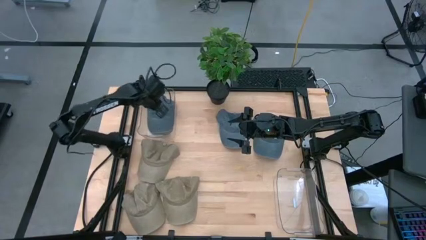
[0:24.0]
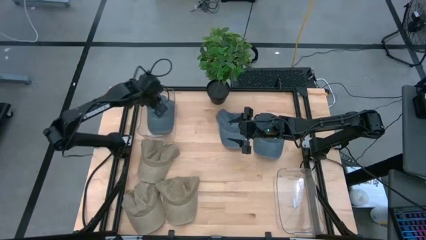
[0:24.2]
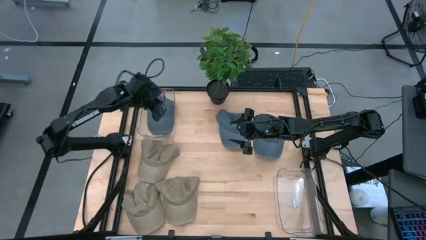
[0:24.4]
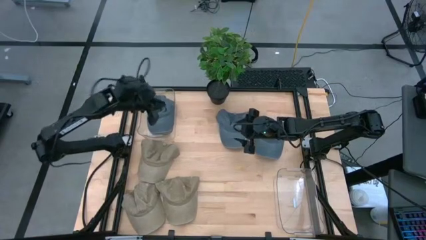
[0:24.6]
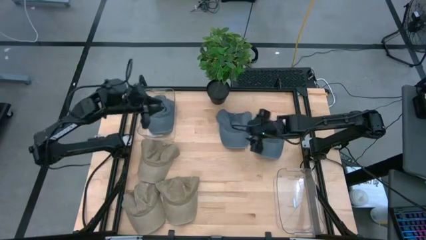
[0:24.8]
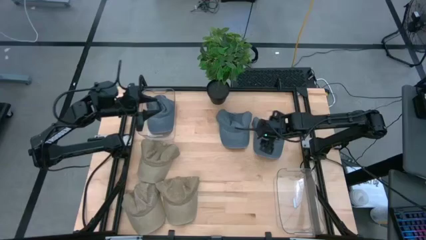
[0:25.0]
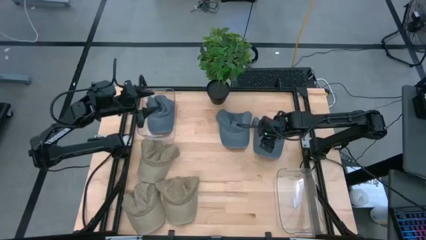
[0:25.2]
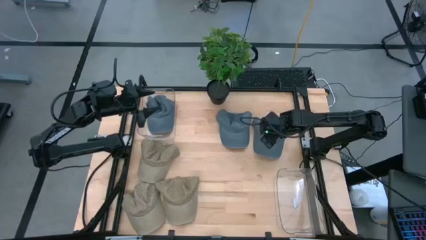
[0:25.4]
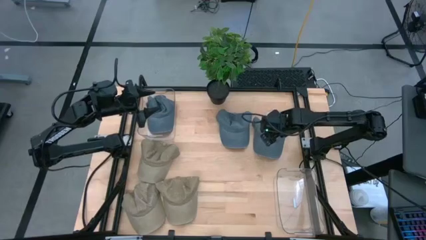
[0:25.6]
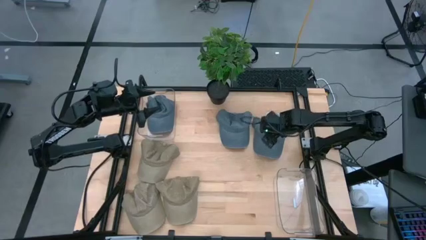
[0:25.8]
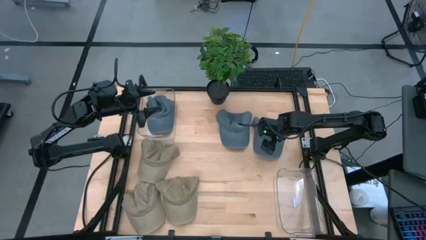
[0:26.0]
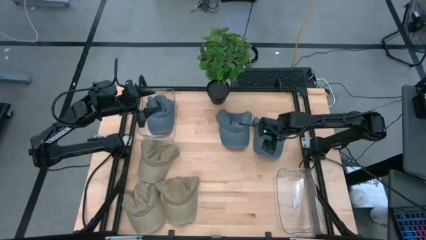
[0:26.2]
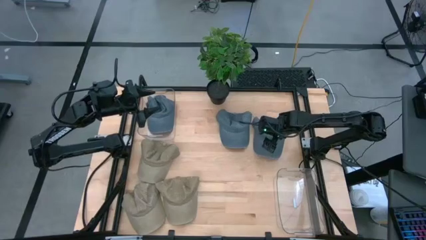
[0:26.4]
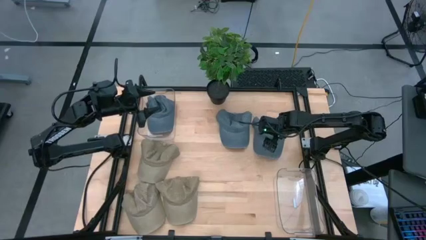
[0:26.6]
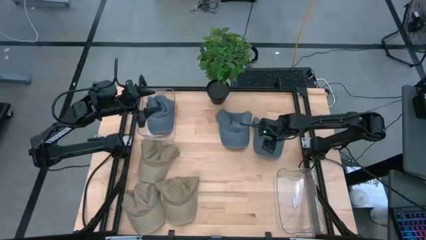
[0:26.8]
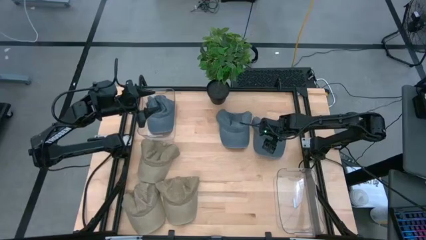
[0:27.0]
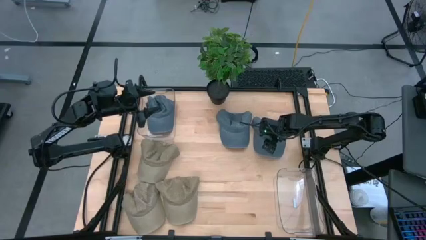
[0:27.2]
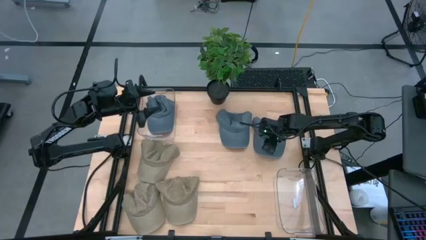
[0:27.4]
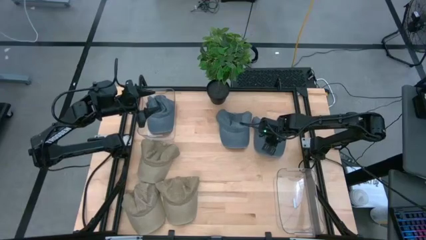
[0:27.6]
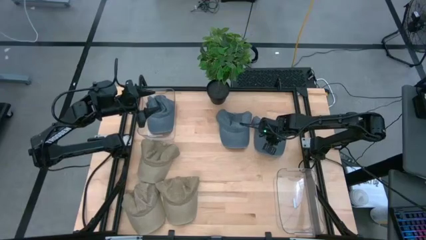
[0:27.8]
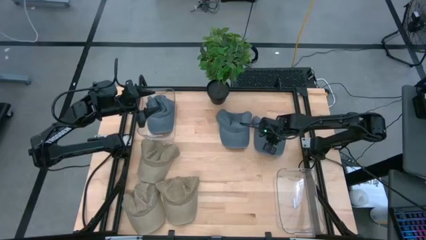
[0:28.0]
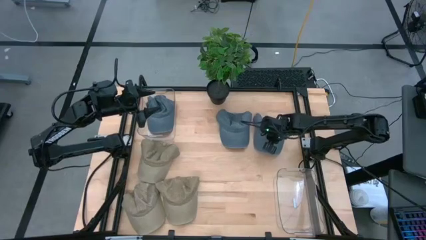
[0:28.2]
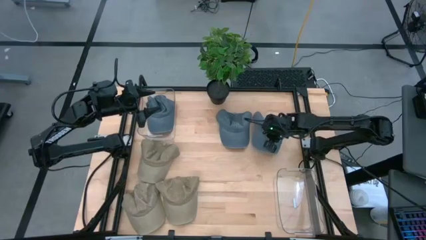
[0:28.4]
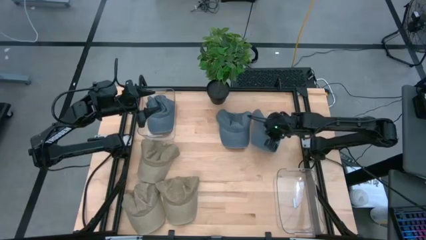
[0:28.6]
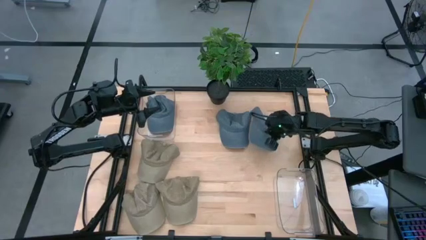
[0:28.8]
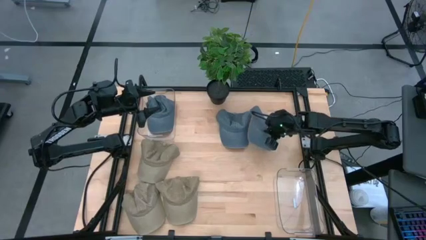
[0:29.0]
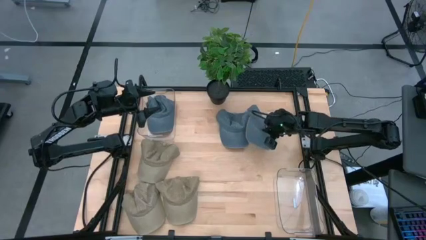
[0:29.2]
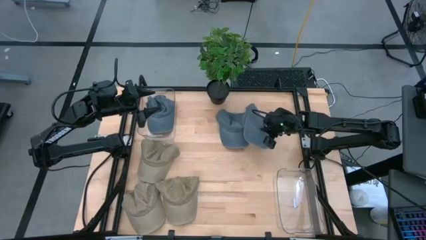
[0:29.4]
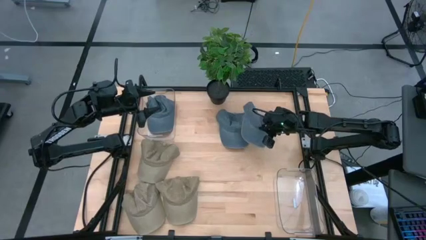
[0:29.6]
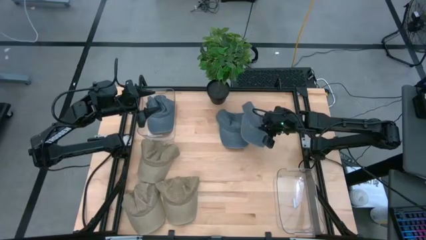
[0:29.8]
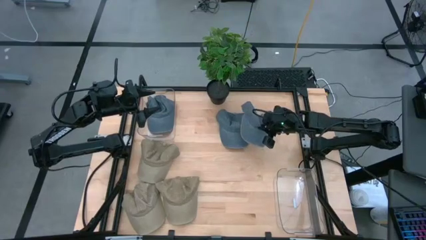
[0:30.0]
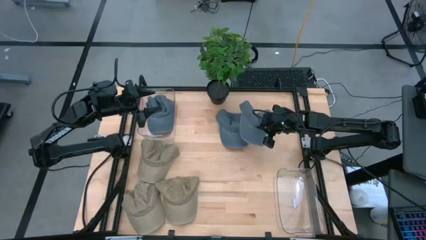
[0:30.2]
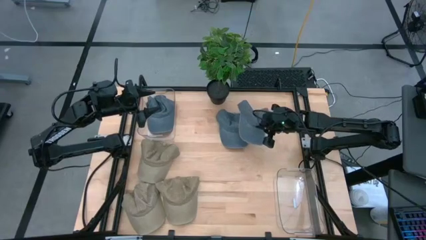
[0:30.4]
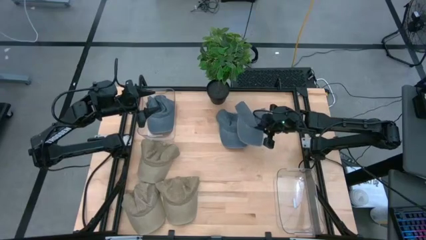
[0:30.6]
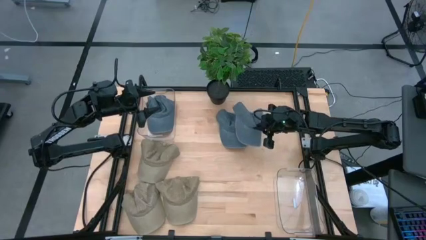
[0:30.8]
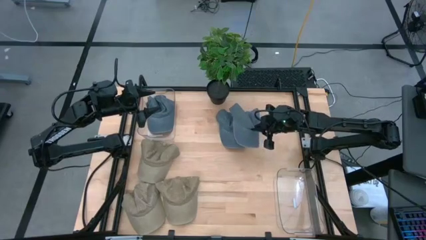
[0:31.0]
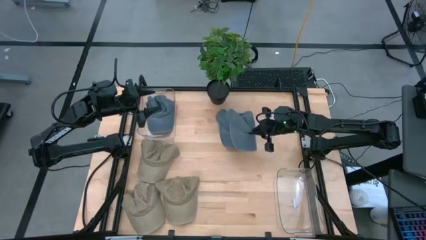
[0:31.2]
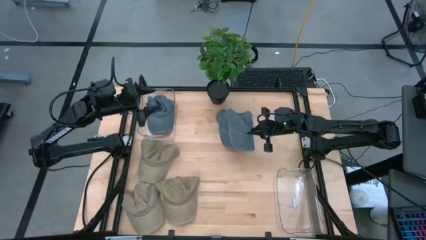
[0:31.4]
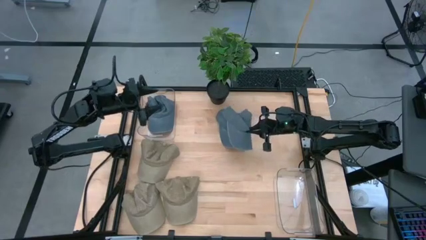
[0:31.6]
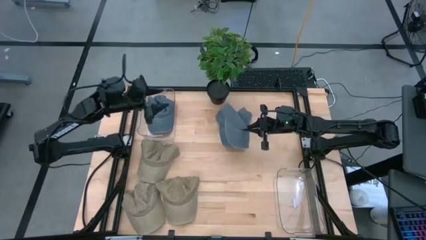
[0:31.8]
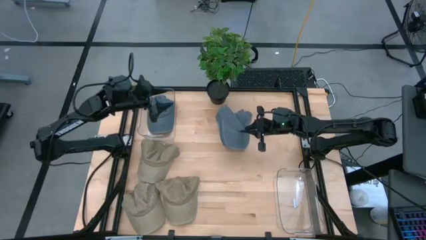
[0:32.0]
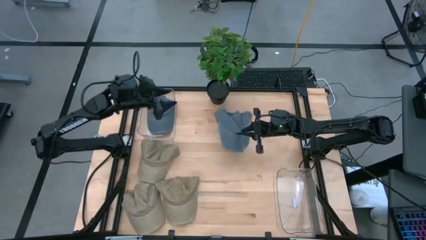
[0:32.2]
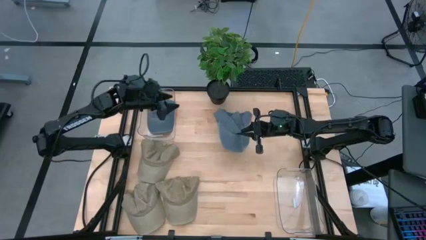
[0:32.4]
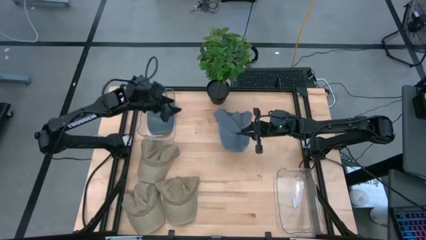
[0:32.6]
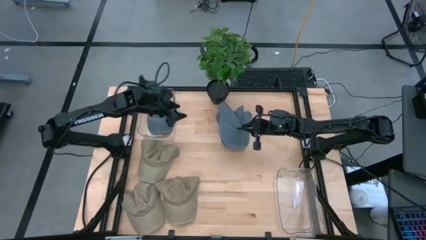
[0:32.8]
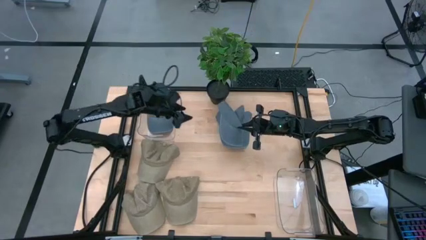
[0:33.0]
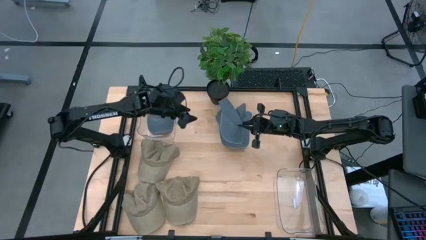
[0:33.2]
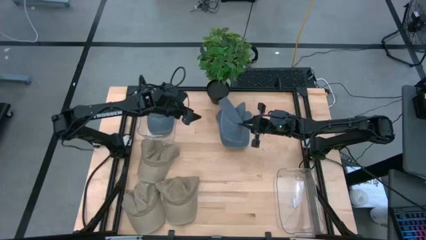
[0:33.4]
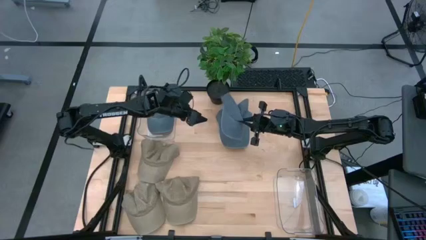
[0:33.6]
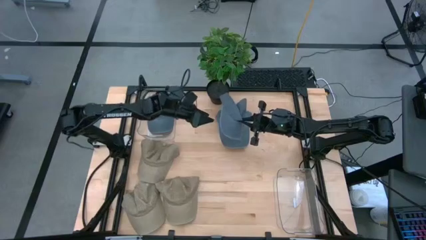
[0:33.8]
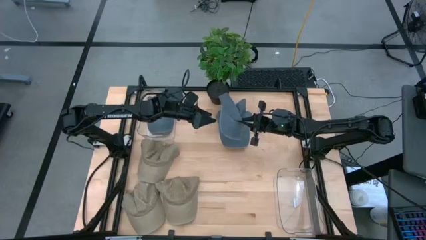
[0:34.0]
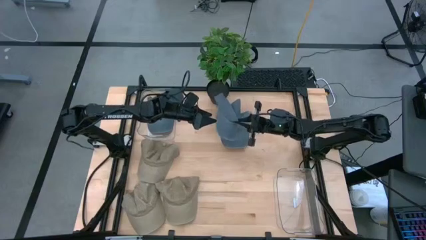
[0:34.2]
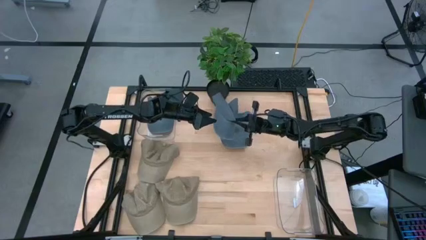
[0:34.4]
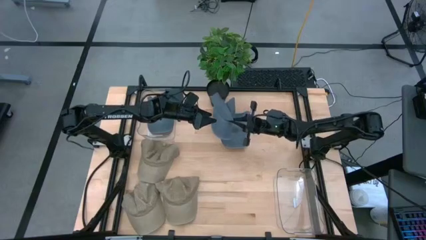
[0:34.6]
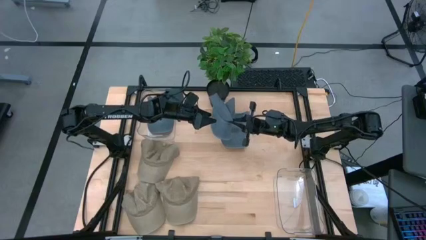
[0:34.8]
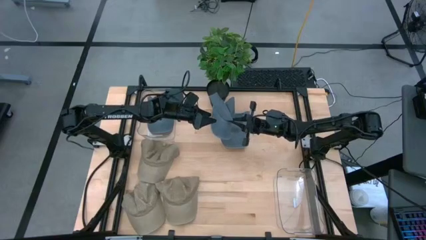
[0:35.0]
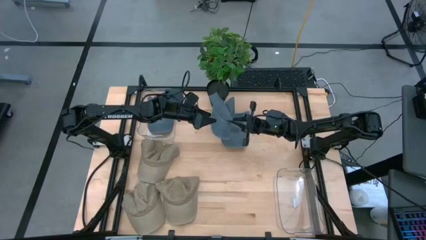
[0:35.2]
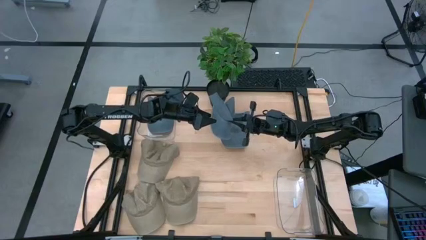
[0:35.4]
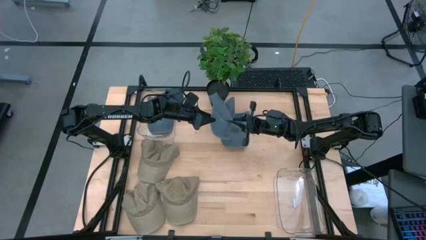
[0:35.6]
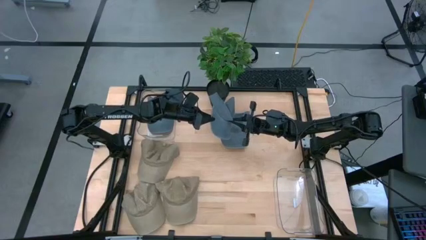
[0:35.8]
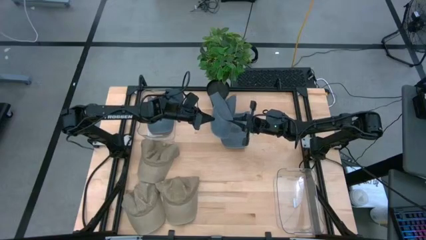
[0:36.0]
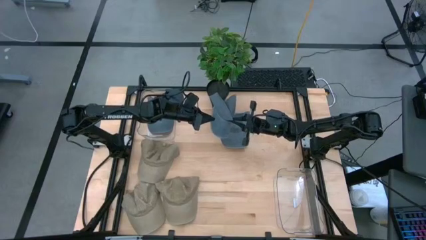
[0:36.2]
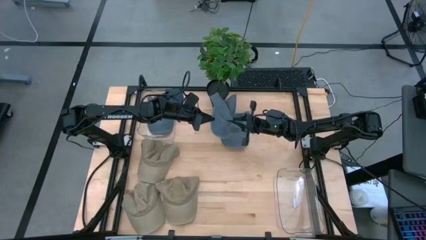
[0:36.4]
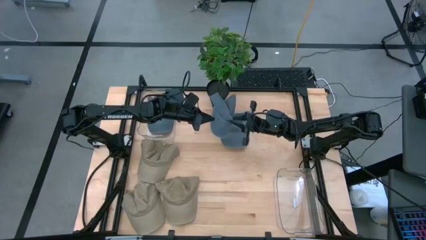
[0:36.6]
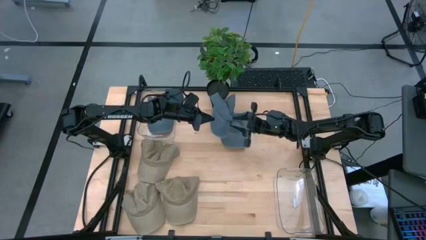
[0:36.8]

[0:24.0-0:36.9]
Task: Pick & Place hat
Put the right blue cap into the left transparent bin

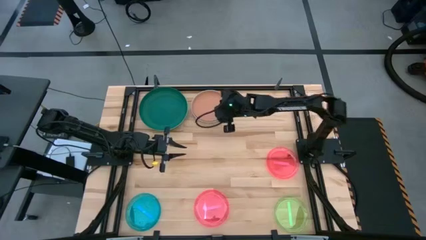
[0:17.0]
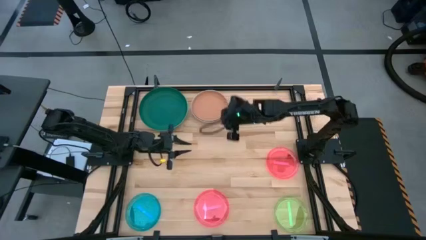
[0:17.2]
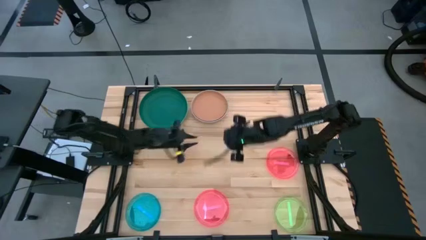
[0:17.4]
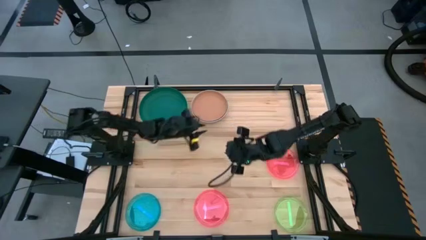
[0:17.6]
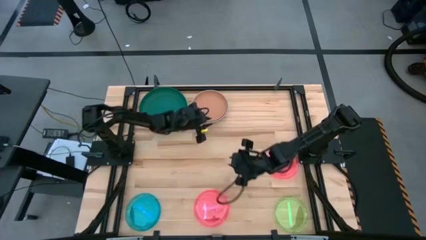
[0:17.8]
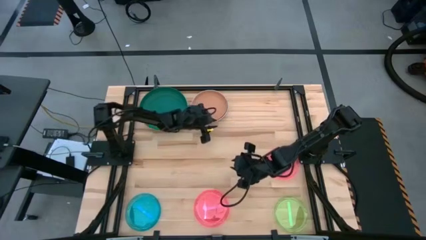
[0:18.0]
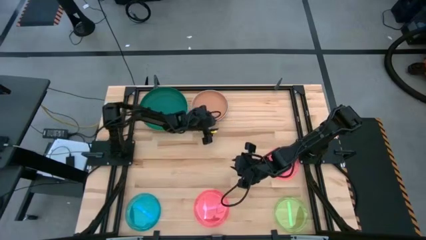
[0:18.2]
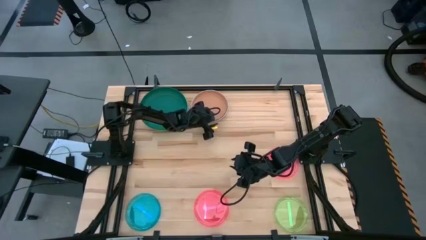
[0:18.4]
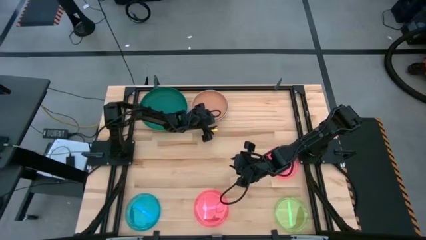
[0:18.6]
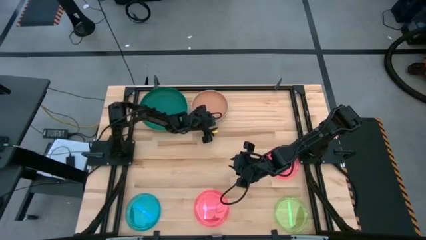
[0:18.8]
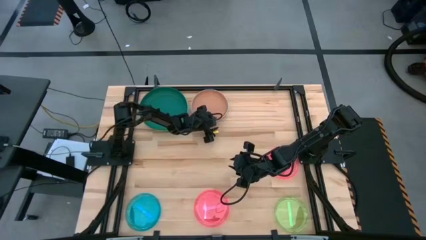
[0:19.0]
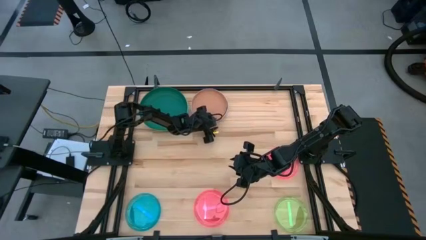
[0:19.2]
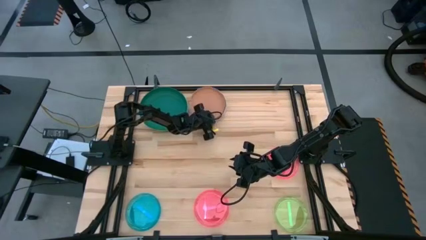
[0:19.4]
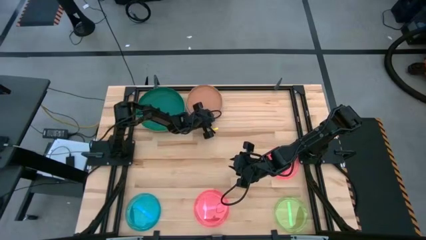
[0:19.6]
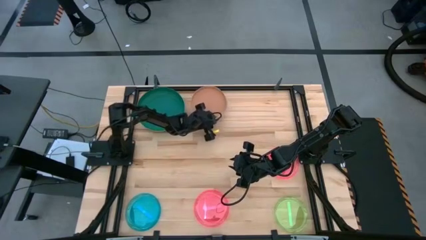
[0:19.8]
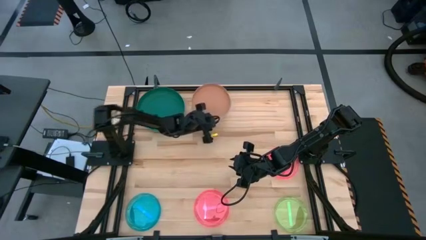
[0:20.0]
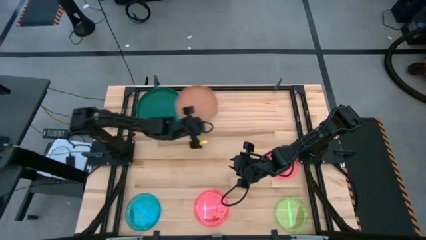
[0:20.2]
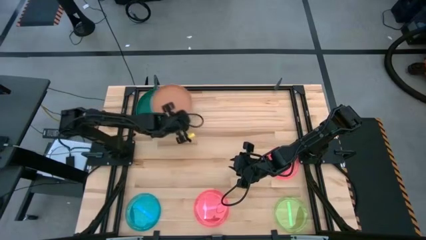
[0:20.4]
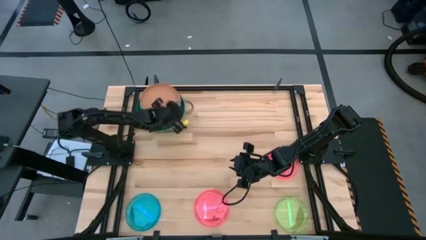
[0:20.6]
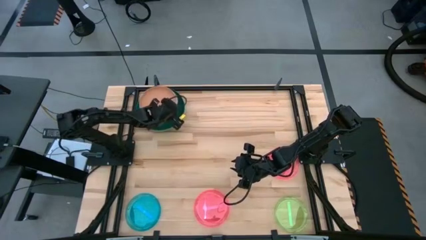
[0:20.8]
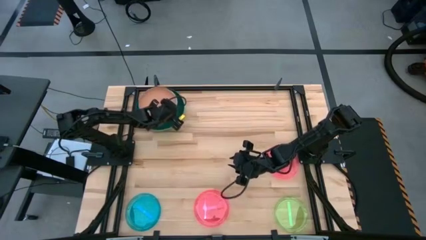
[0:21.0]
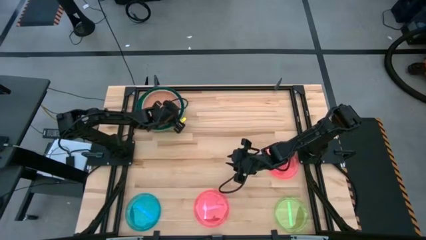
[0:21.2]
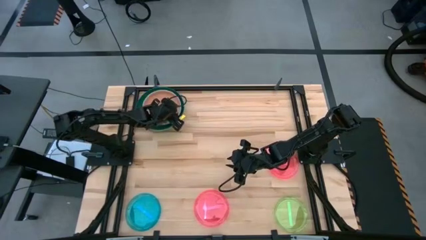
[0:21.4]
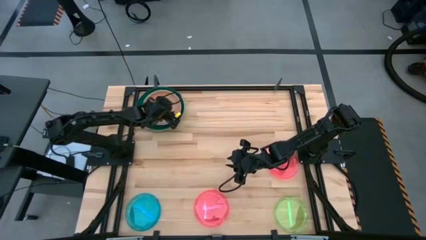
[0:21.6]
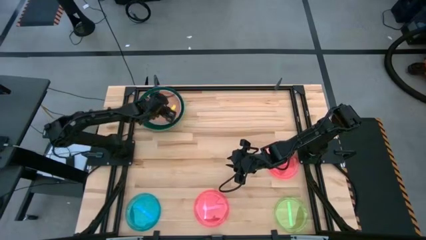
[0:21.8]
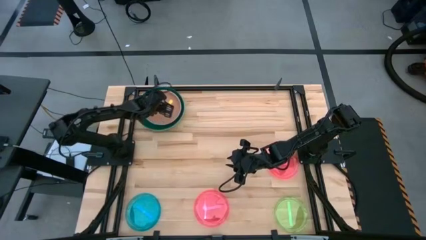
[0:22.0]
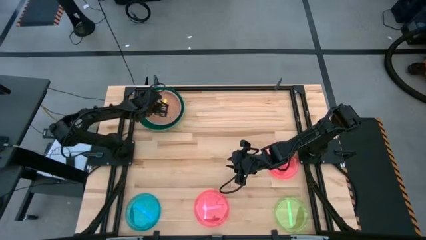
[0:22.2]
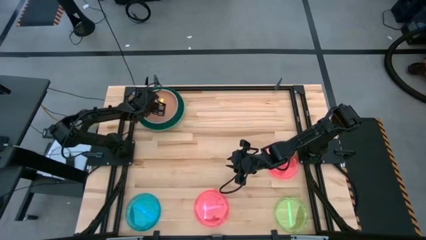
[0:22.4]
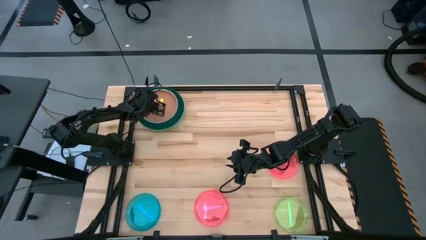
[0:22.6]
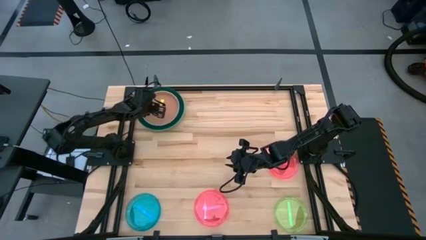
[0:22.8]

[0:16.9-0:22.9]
Task: Stack plastic plates
Stack the stack plates on top of the dark green plate
